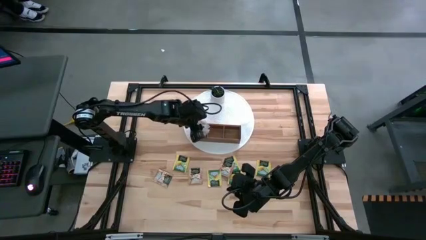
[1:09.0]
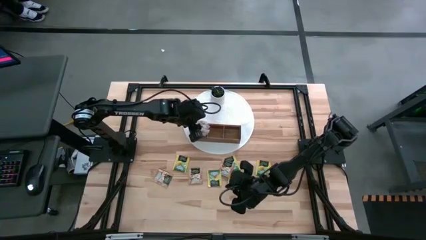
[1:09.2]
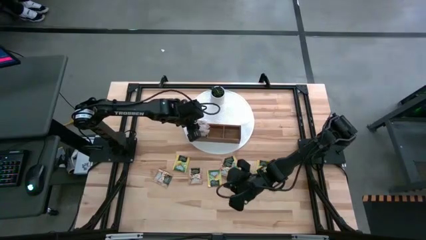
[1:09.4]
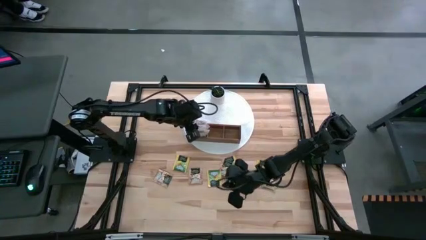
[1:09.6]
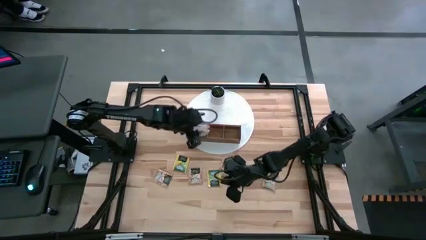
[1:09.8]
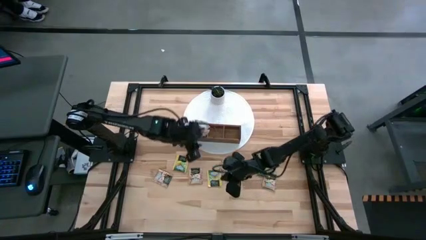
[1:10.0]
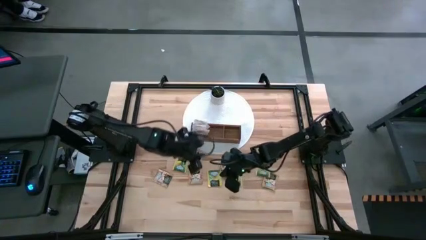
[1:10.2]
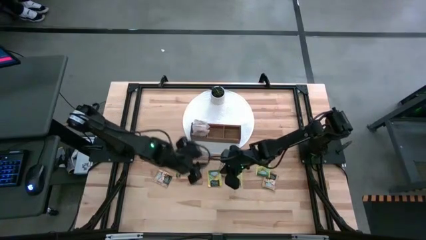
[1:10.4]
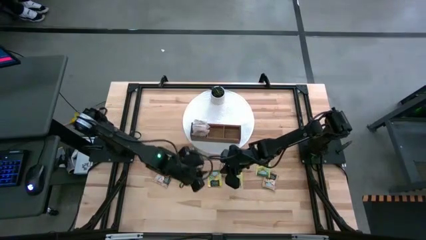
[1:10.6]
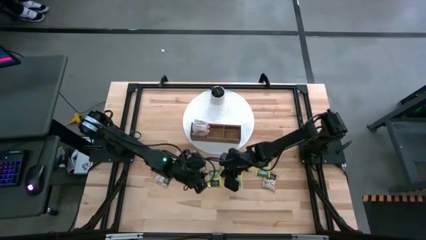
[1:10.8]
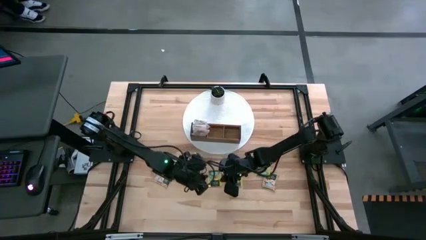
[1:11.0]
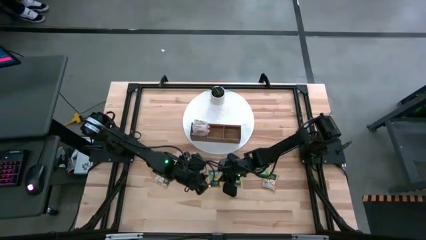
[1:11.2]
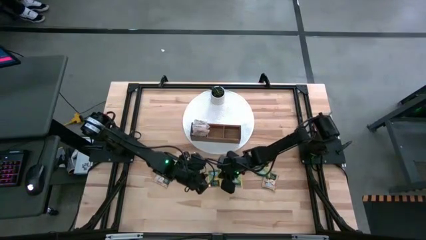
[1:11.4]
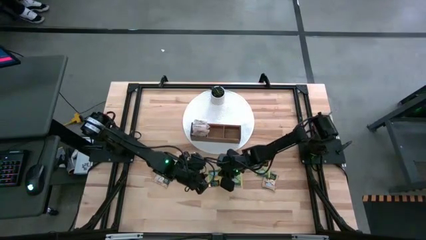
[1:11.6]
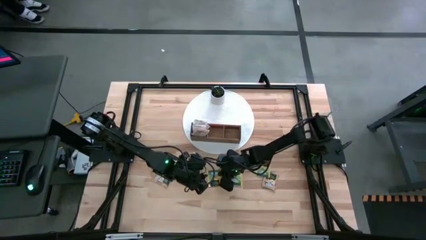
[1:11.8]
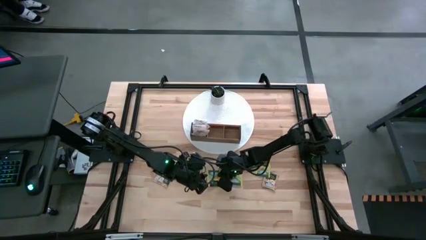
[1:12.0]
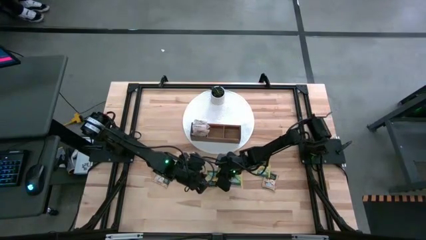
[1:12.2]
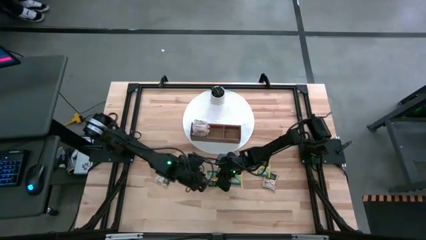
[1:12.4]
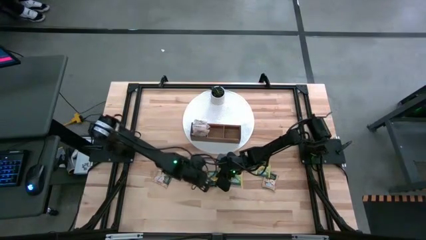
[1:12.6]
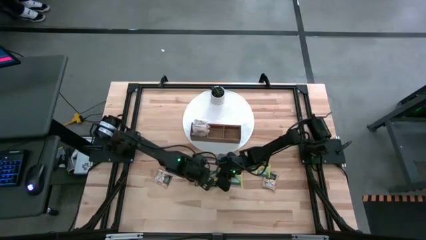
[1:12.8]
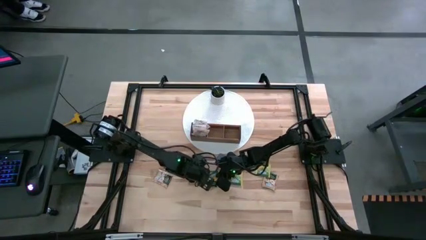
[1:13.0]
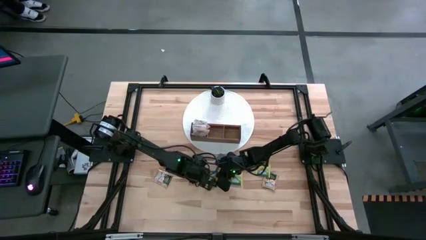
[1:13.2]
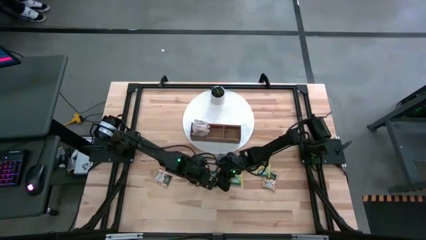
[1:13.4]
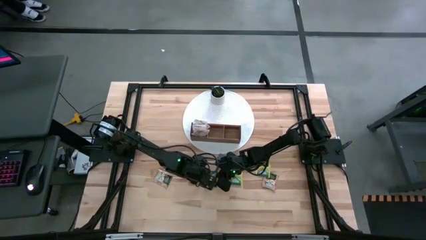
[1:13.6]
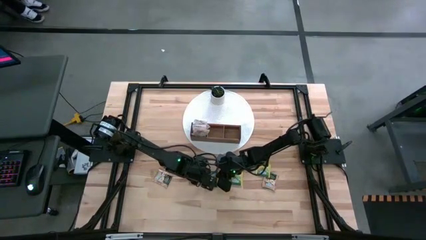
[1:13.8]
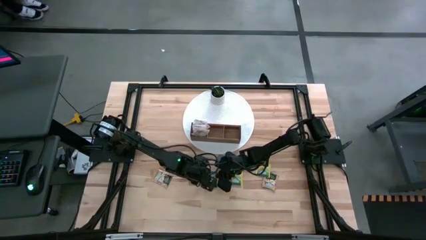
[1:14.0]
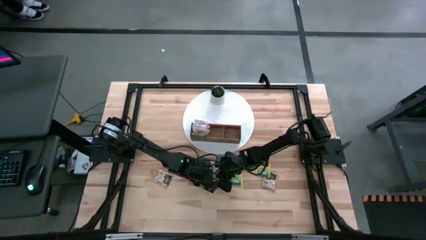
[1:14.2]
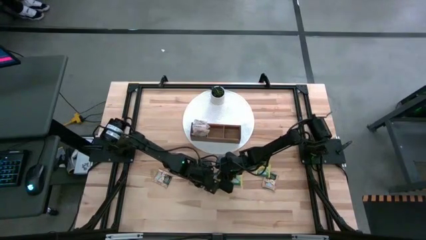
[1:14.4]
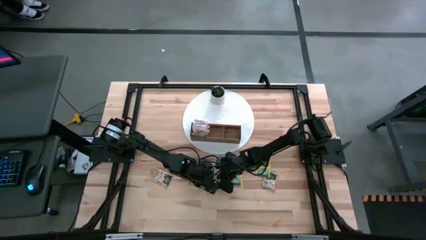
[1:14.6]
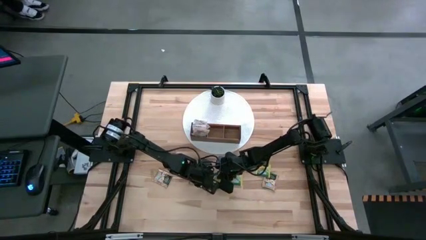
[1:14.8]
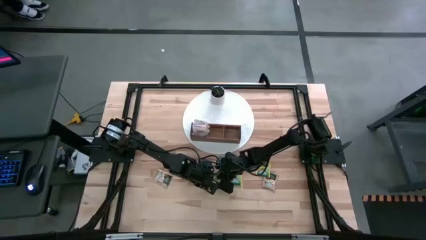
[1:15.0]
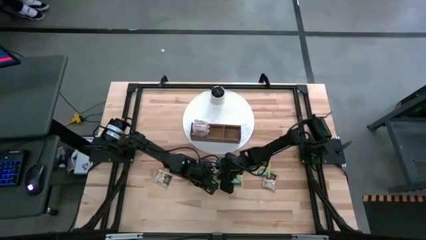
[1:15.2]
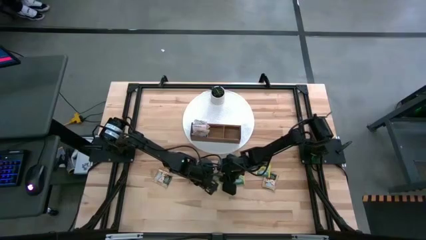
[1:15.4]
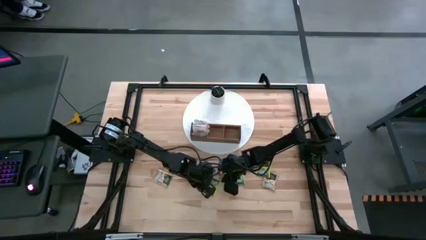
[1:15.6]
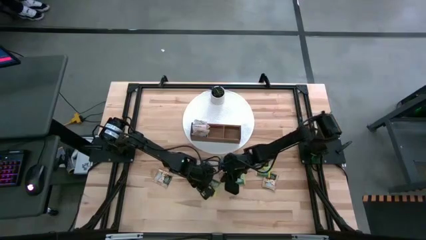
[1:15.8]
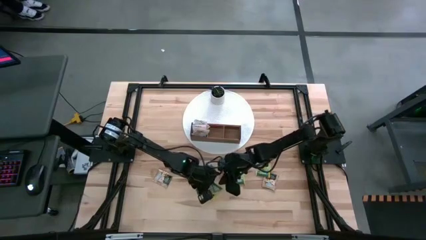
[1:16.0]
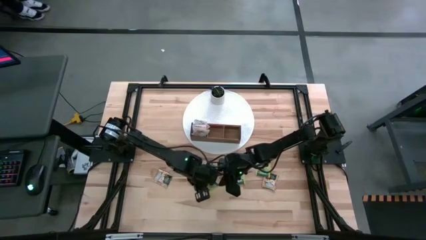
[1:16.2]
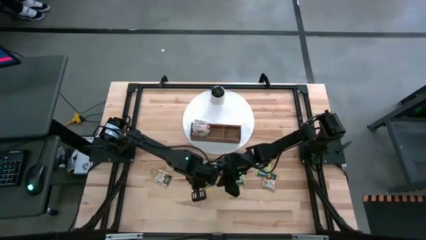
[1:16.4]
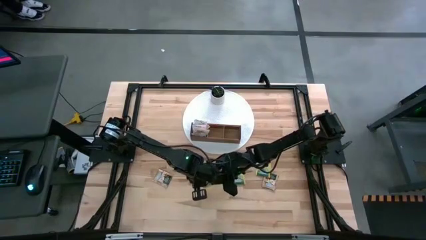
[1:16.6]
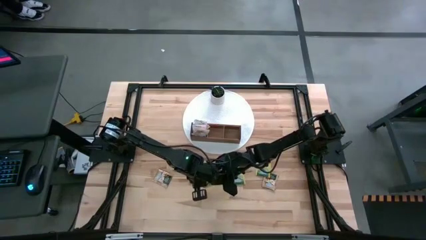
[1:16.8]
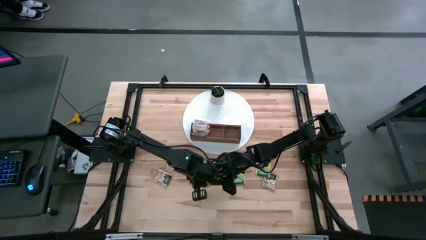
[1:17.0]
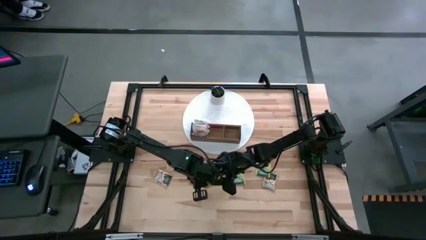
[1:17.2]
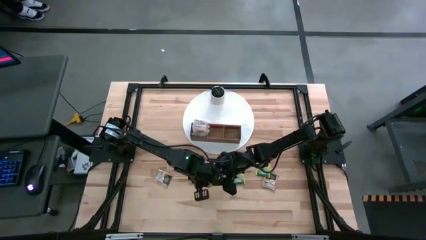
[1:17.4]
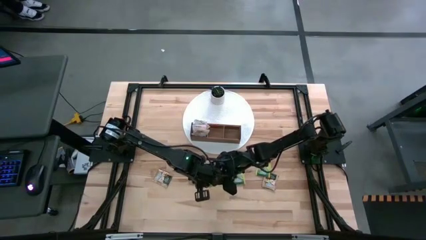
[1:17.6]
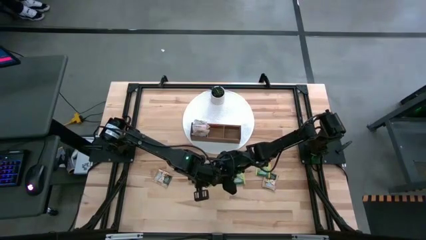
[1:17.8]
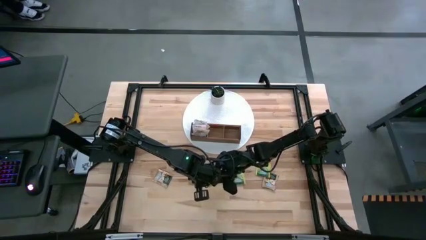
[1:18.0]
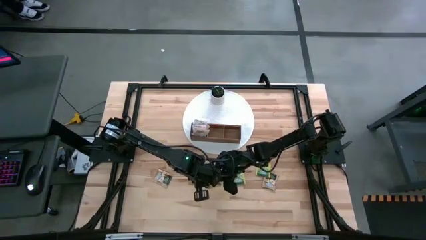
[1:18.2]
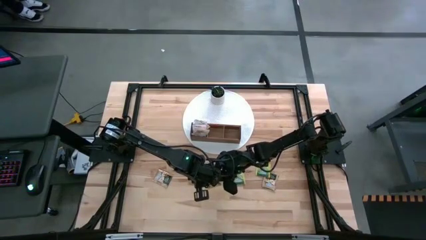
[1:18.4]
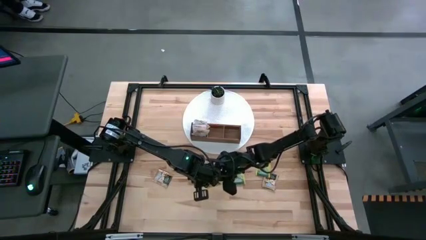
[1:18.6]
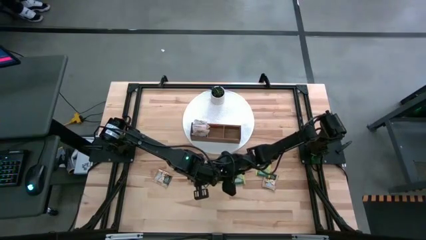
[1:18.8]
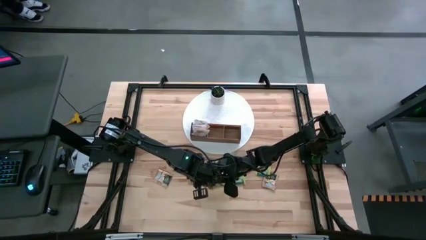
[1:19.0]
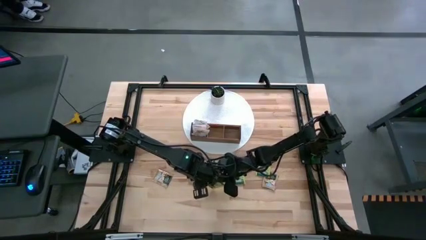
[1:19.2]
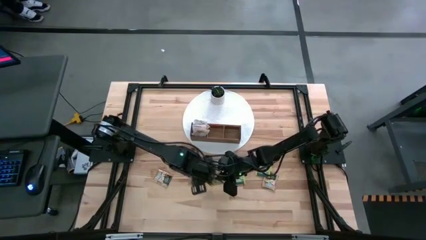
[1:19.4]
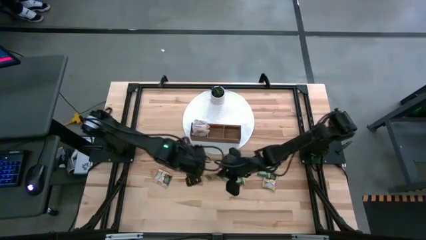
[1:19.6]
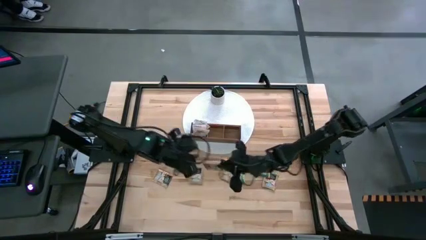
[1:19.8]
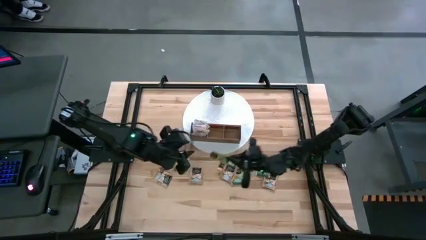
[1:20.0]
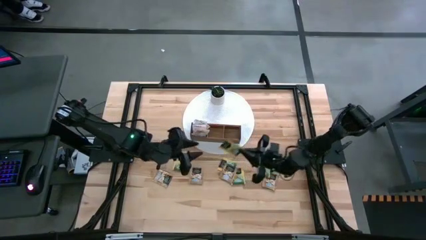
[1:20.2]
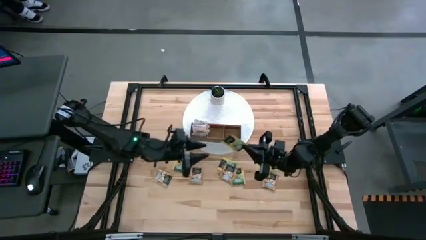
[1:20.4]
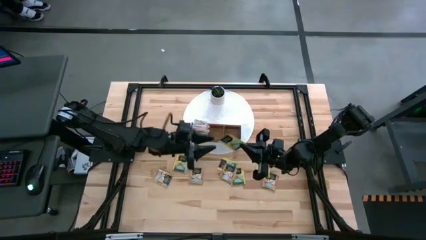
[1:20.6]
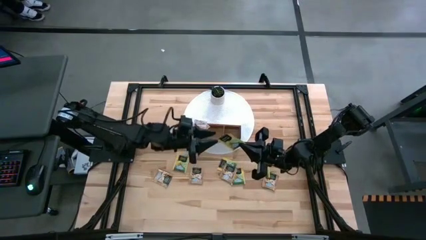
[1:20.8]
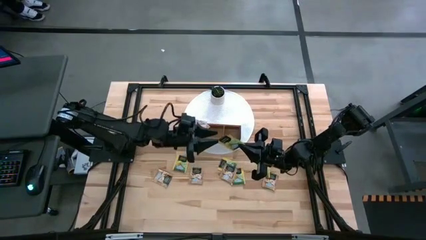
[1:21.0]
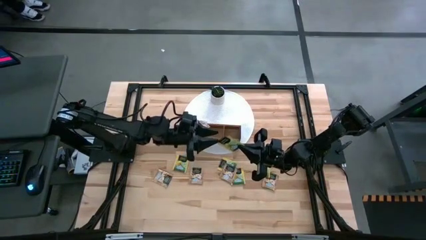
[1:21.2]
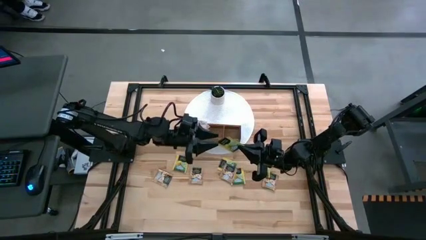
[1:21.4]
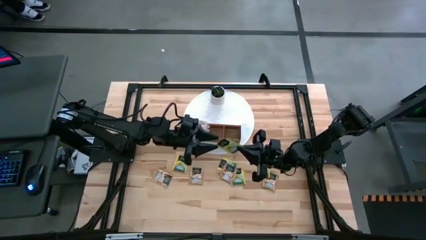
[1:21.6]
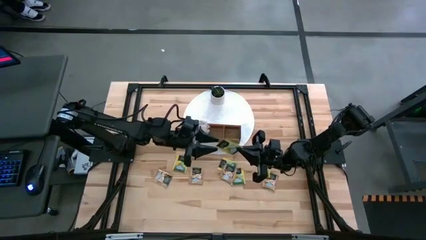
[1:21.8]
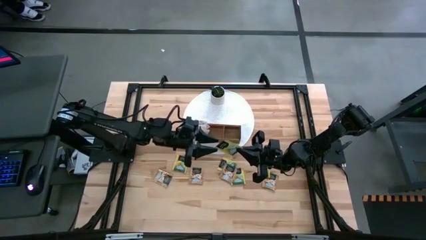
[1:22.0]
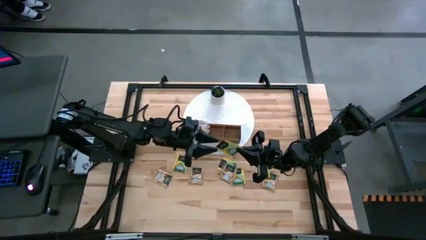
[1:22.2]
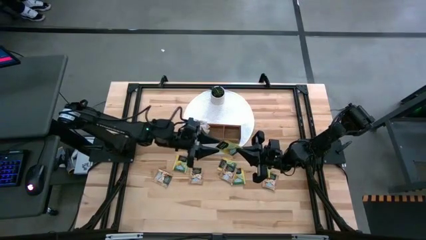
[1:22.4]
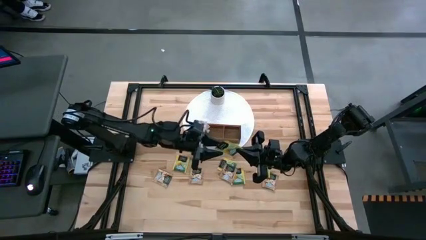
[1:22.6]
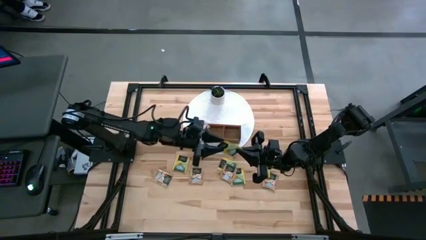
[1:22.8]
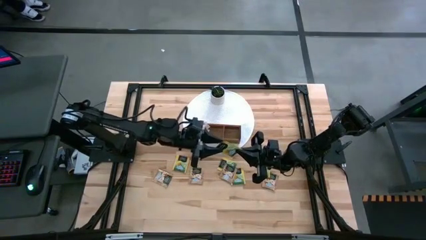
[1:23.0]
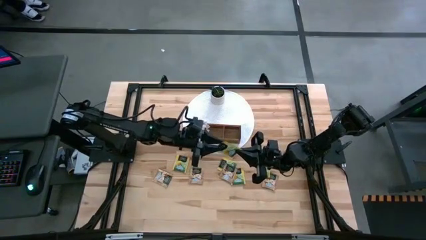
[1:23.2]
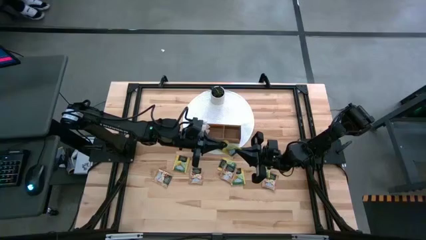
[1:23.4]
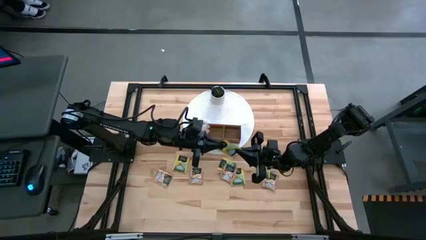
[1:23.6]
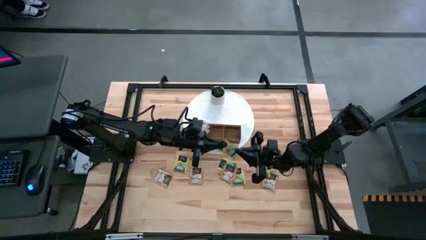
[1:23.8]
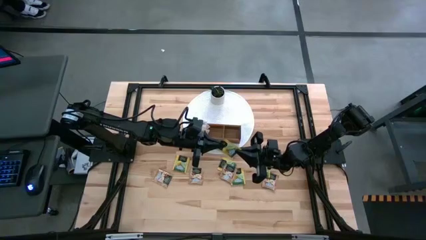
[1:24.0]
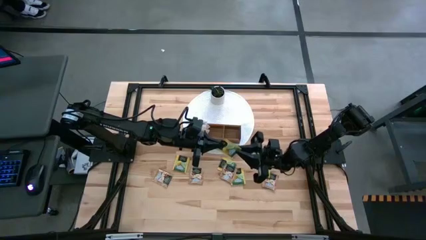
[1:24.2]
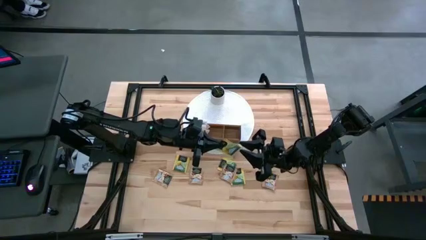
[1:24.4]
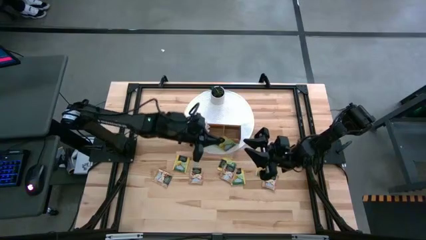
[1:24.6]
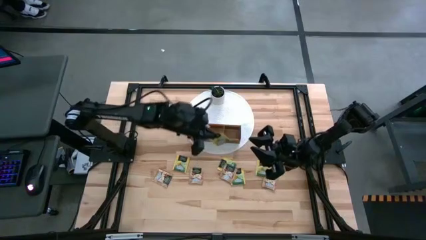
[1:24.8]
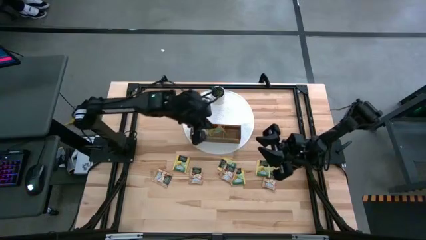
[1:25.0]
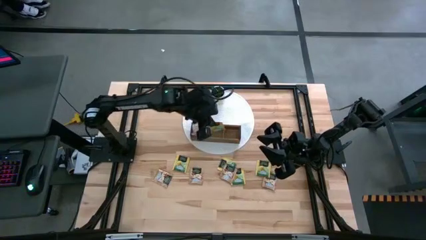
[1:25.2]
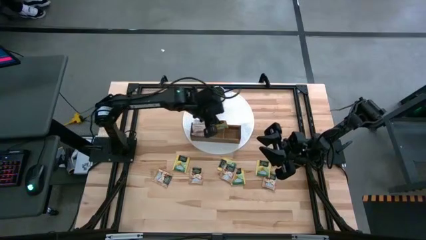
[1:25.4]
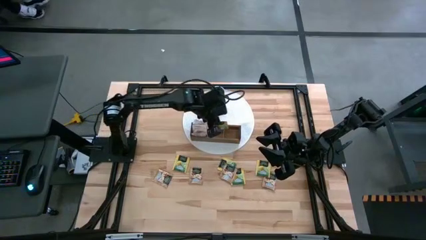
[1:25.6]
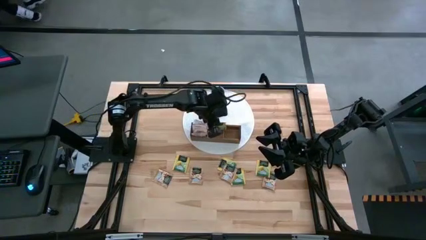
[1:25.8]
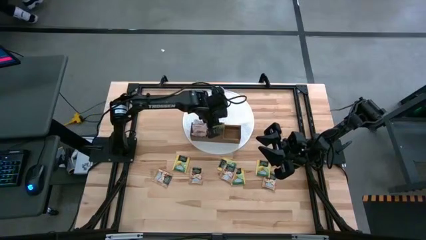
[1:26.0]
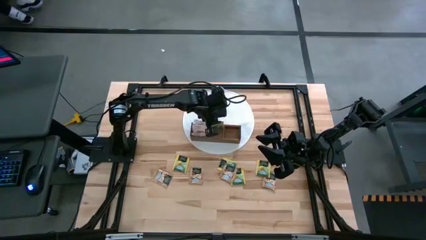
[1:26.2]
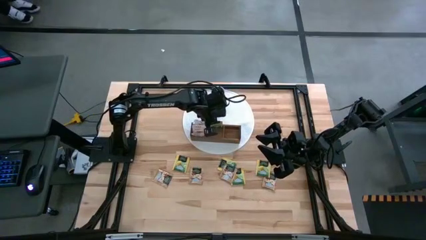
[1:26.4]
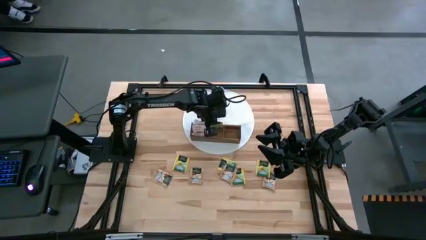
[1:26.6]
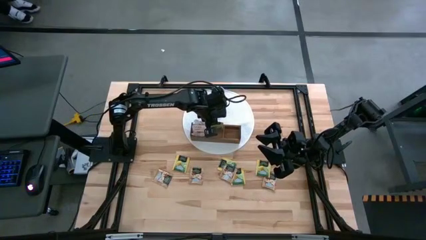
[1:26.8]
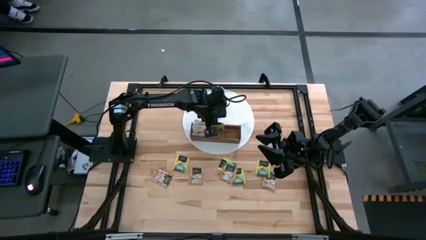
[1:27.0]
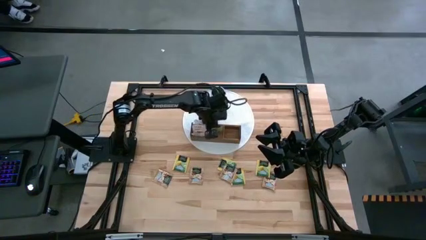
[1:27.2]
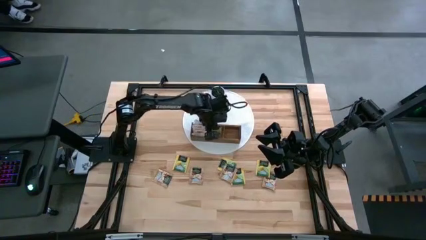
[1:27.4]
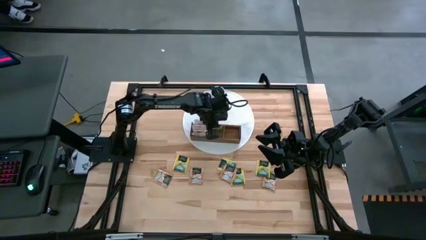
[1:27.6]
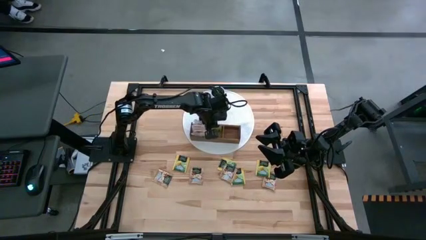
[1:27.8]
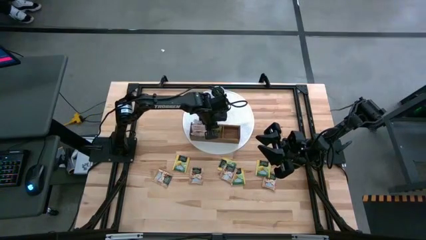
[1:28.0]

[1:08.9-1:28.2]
Task: Pick & Place Tea
Put the yellow tea bag into the middle section of the wooden organizer
